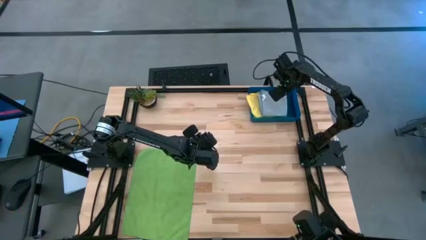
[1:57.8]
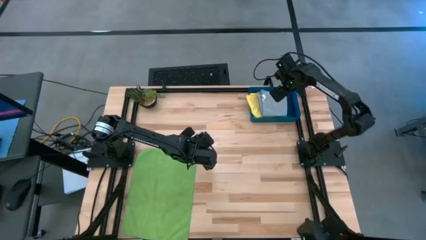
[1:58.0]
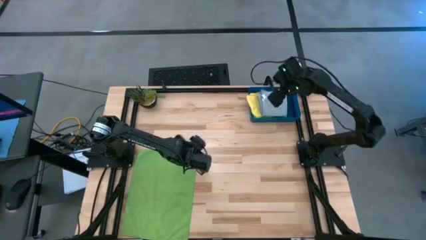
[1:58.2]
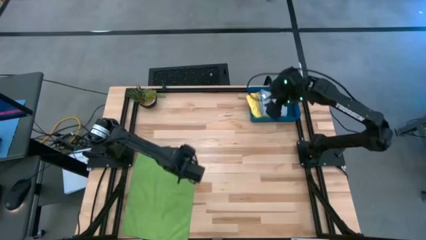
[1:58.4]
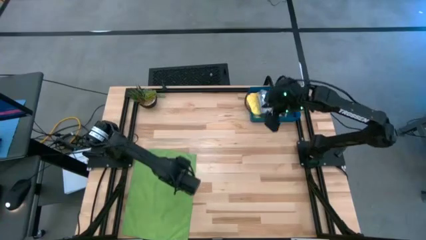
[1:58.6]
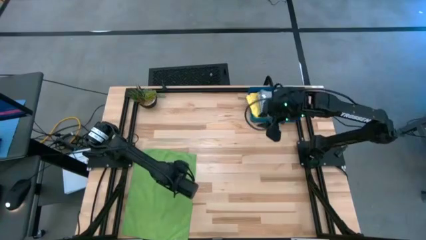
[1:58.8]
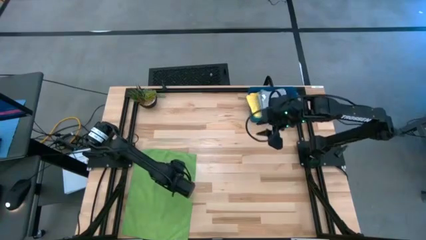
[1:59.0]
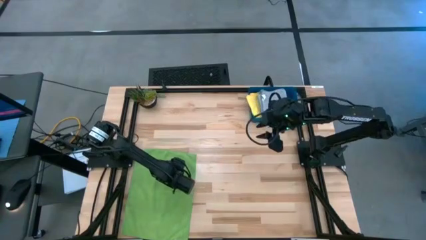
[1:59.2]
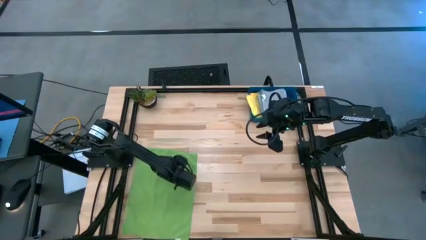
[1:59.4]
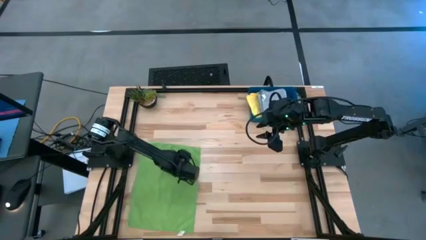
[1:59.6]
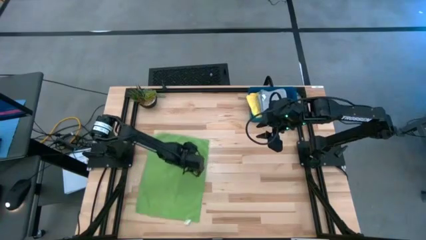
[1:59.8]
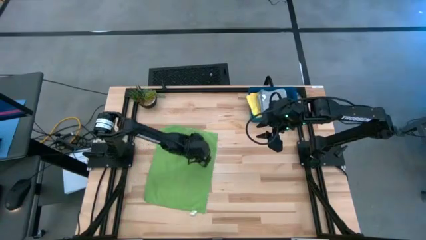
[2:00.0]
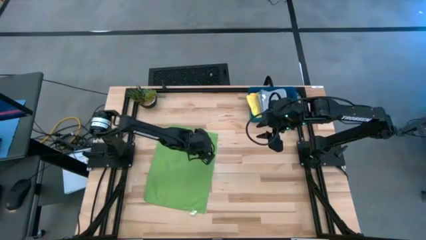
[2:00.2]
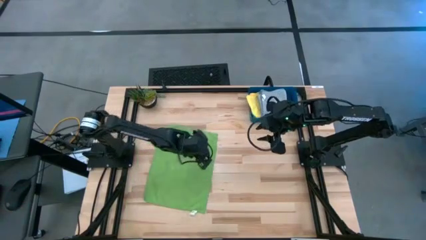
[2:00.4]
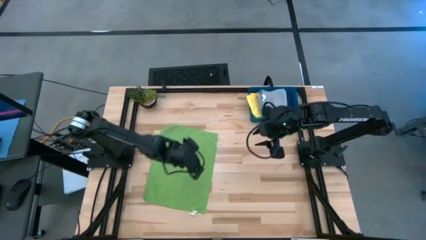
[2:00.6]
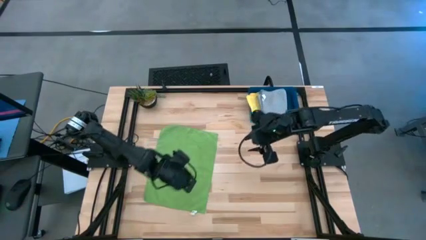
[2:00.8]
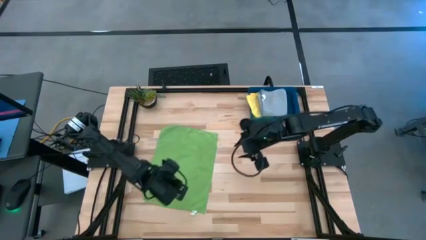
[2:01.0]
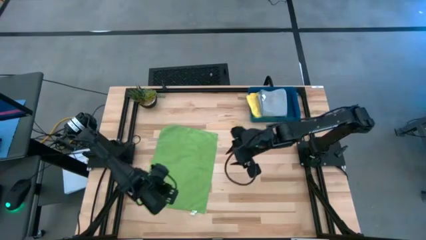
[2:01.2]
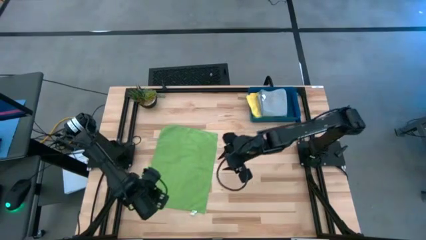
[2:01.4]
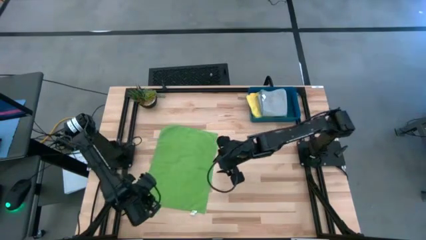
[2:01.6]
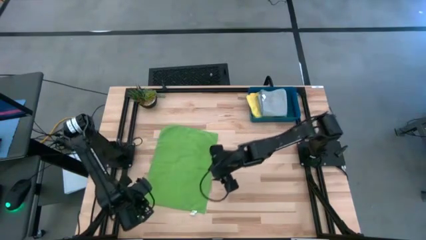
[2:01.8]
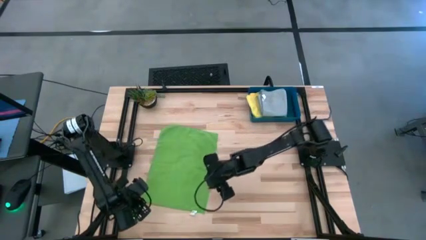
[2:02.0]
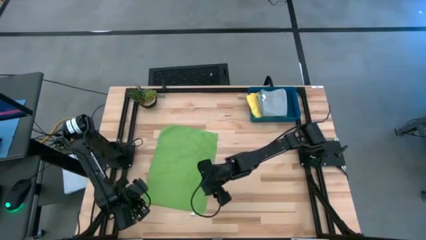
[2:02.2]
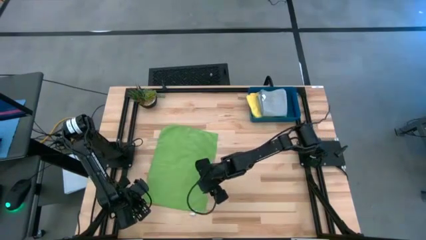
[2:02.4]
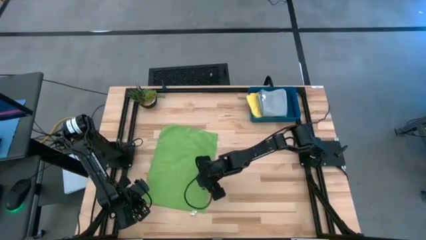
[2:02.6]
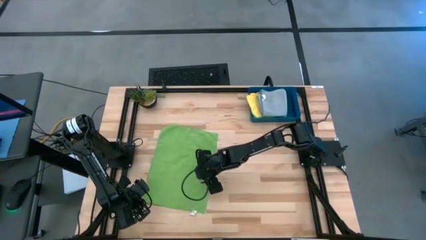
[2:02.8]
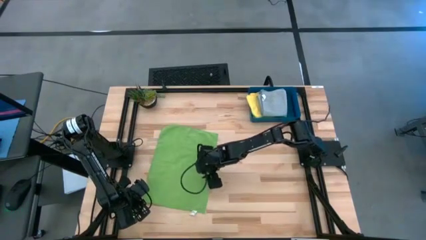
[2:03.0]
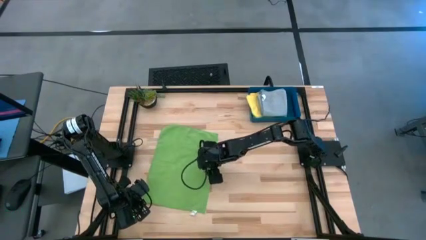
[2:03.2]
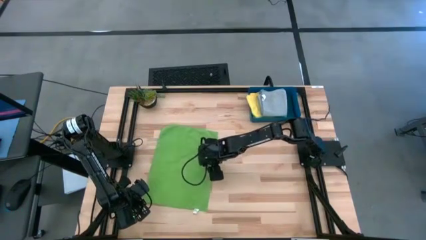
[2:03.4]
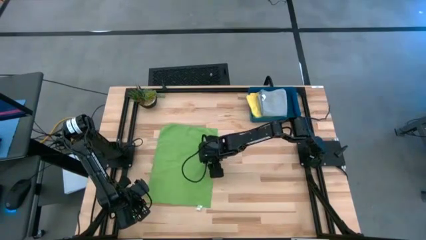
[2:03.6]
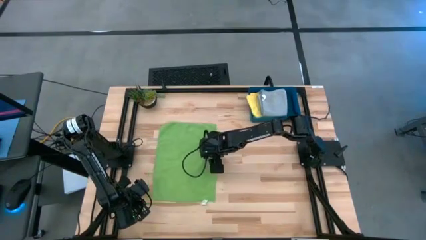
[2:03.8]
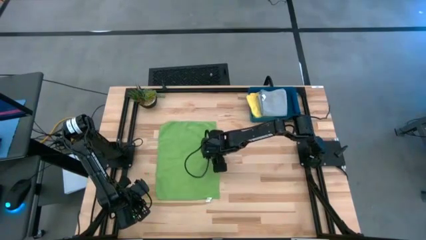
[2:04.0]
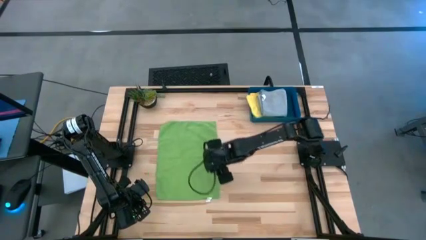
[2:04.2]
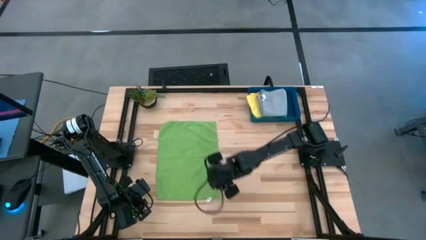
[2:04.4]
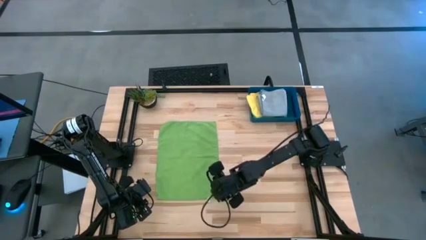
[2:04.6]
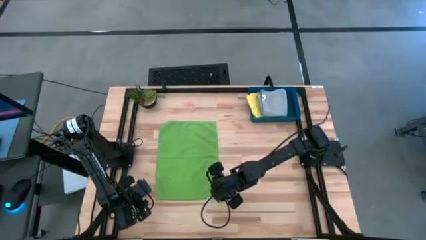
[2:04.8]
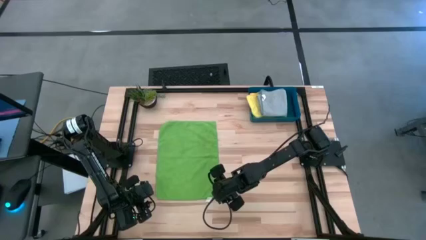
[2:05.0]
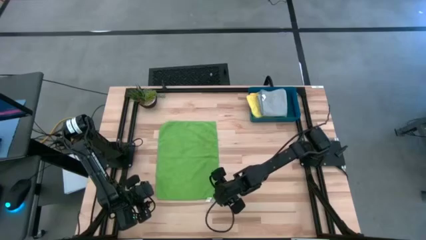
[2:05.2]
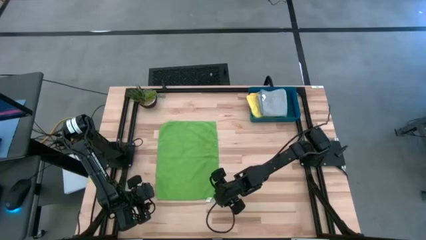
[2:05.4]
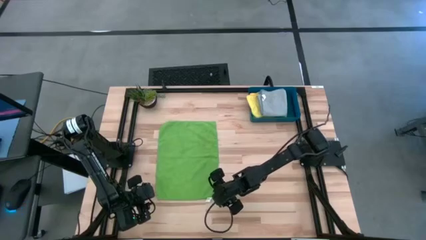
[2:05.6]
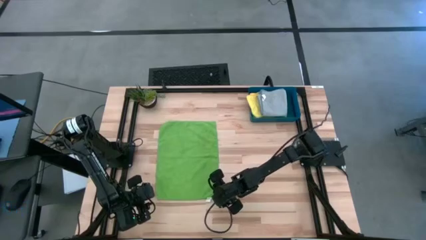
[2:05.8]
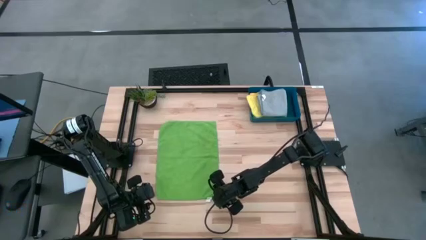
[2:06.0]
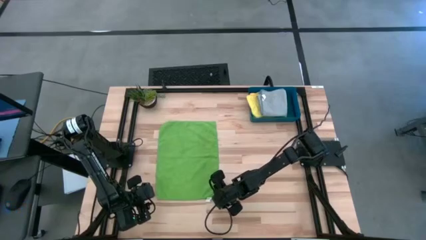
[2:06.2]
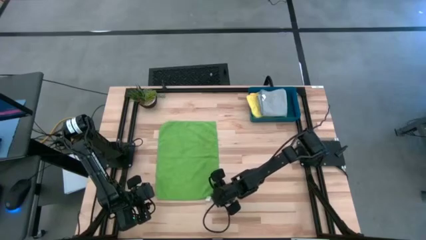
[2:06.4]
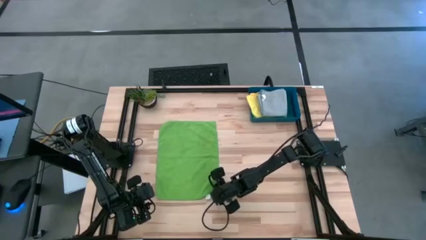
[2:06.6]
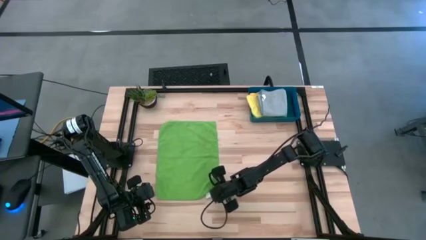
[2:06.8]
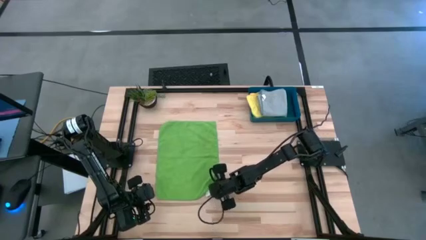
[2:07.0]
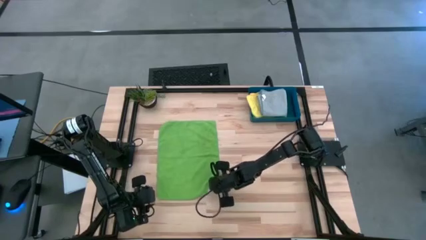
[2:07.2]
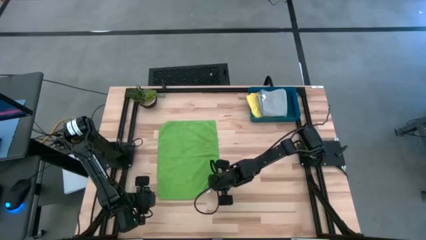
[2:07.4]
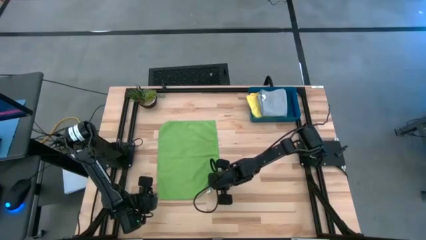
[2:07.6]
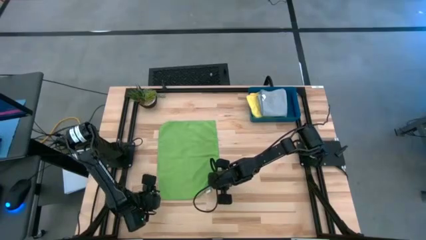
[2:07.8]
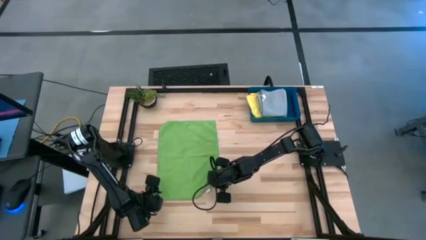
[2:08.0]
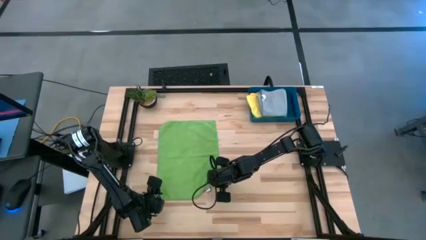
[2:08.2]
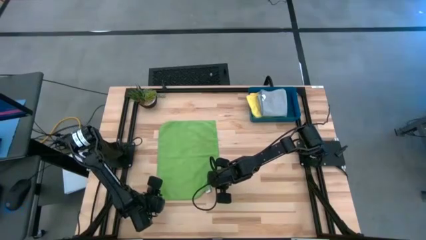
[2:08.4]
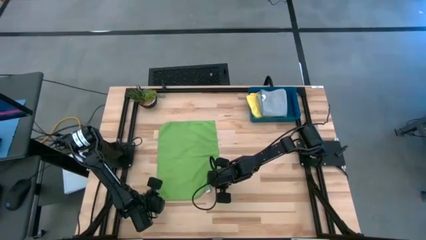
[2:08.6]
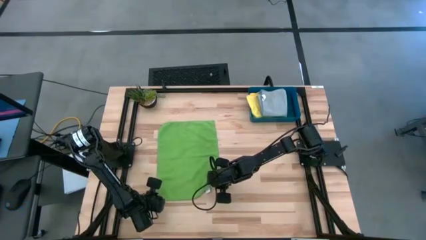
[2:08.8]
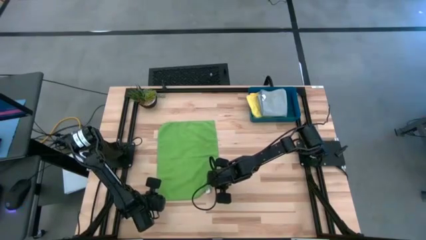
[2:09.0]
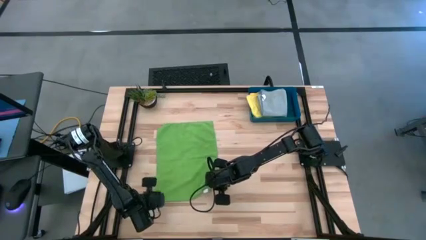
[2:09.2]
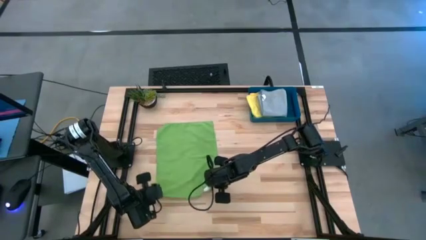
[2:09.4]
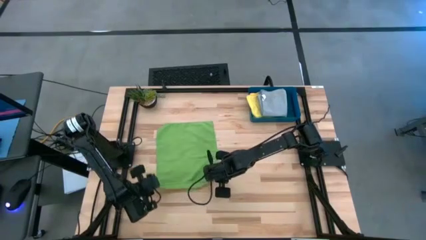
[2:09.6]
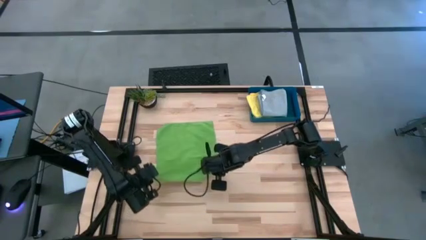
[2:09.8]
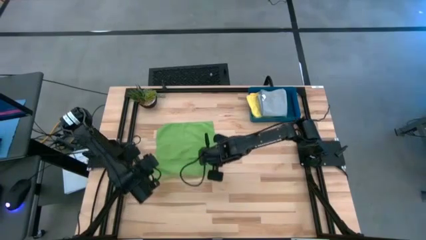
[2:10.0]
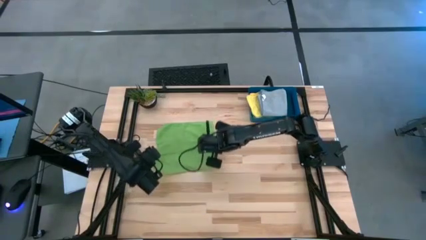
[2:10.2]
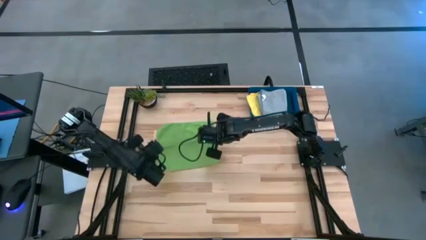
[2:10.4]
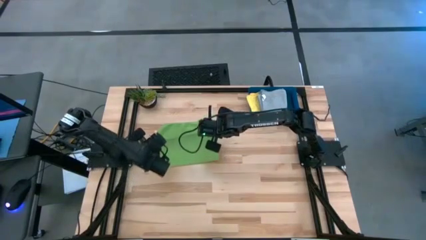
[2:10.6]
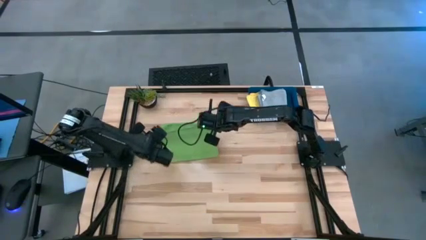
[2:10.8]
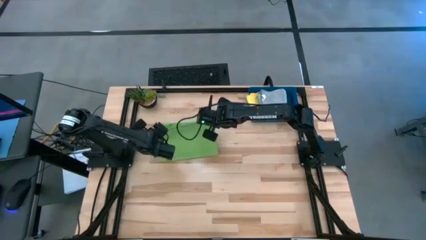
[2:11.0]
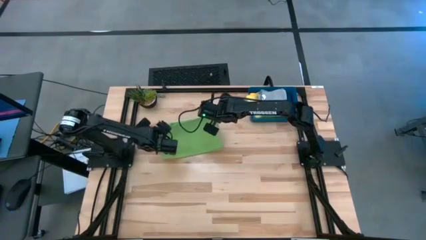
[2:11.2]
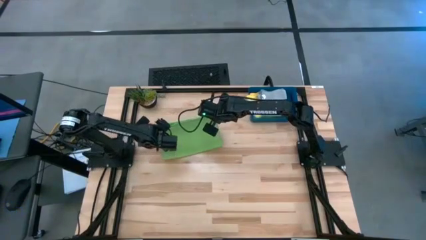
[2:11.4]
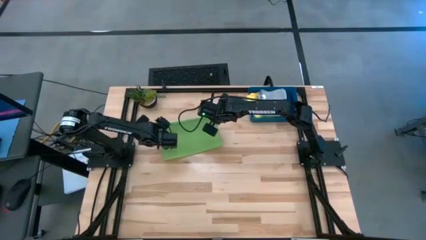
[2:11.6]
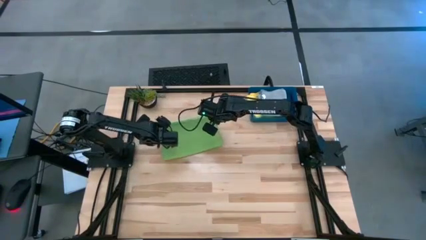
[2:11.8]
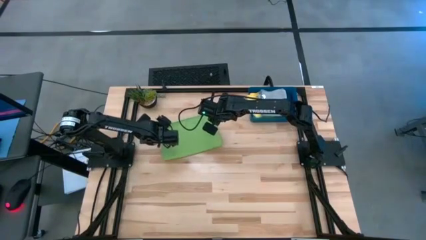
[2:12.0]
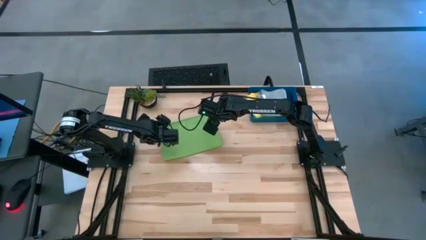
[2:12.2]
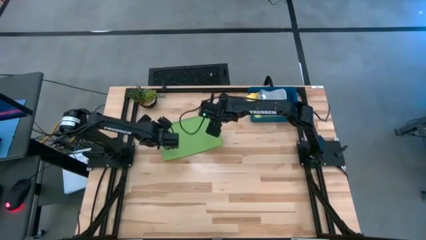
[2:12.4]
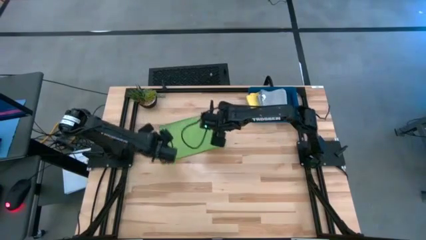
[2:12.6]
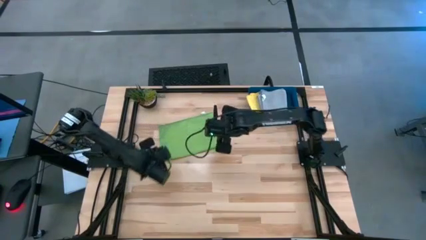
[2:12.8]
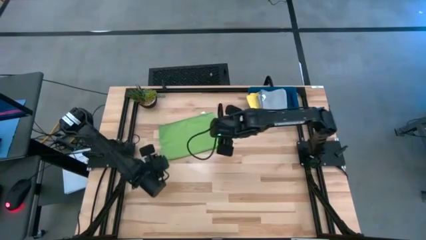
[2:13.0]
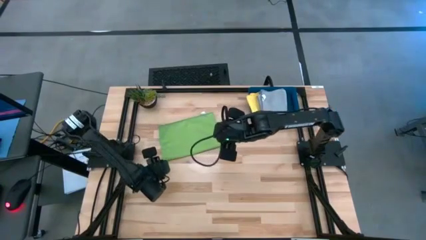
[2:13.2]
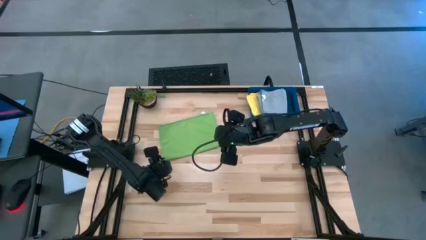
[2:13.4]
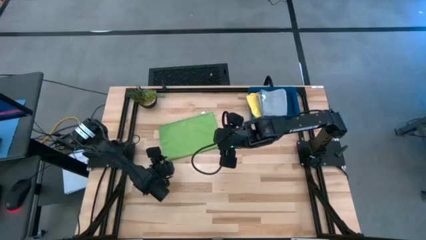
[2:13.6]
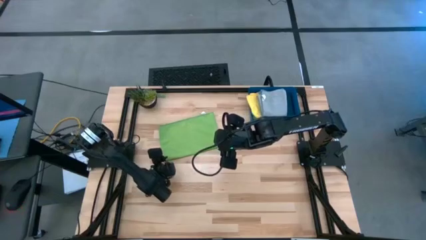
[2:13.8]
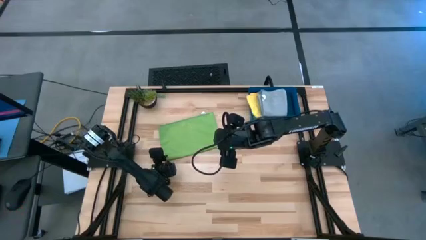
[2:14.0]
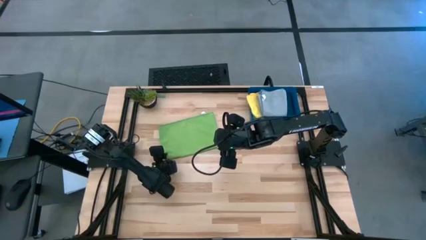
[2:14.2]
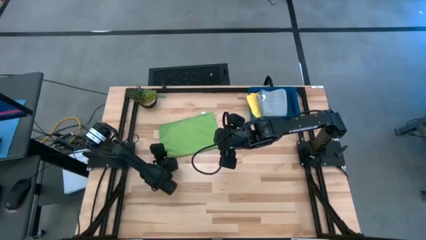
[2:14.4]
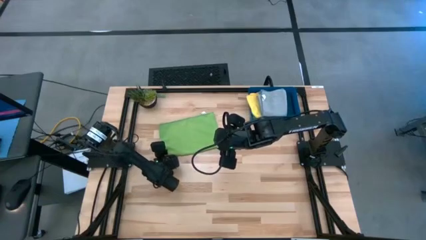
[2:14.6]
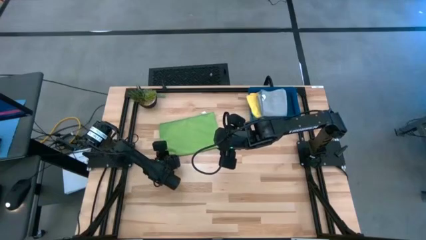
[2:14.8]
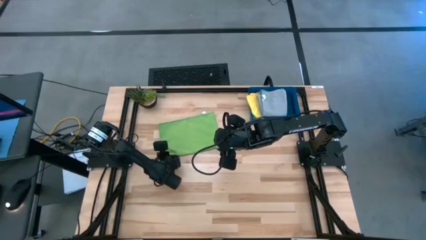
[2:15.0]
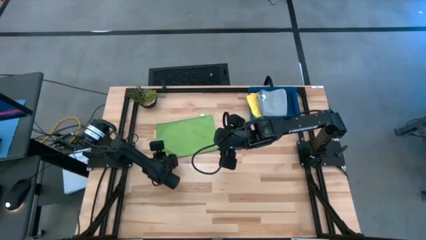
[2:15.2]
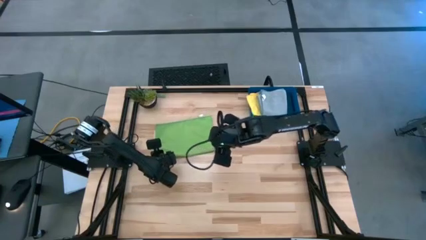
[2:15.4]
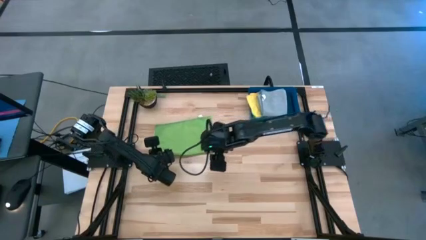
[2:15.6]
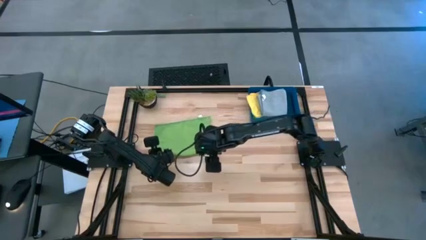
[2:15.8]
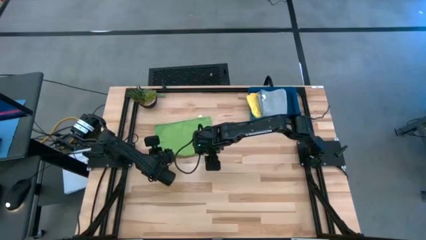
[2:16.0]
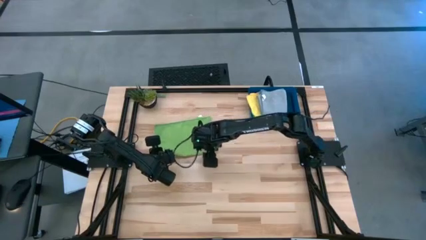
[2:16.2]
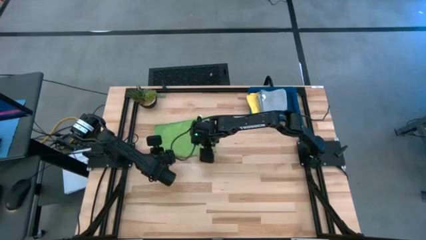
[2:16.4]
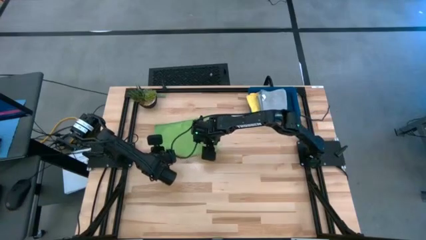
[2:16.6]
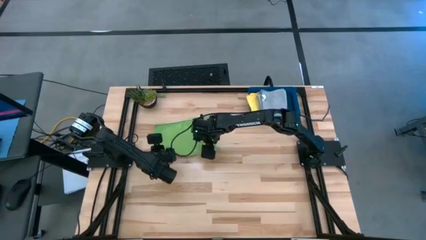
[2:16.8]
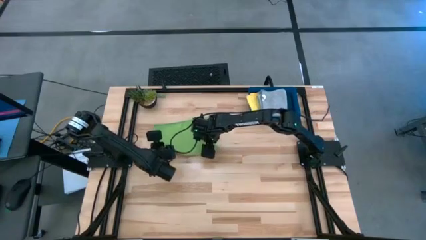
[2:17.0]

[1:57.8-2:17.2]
Task: Fold microfiber towels
Fold the green microfiber cloth
